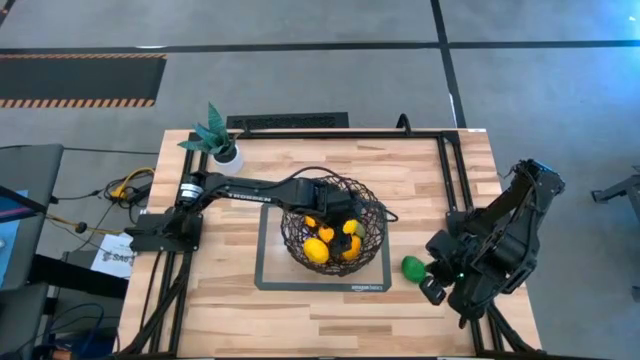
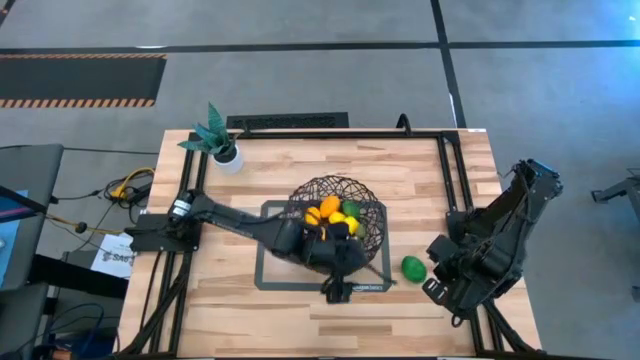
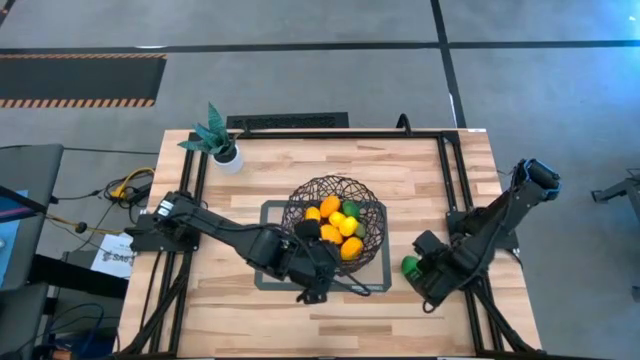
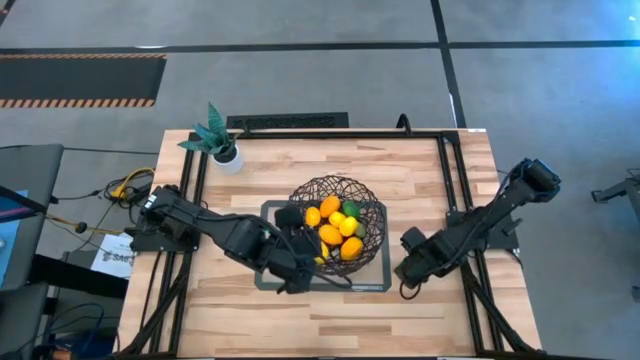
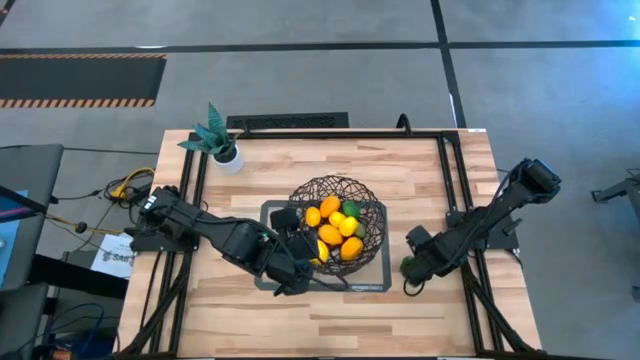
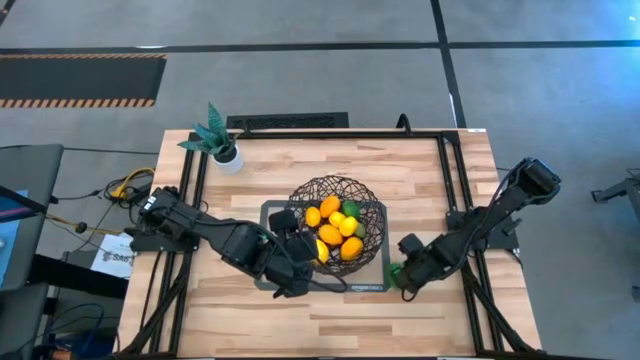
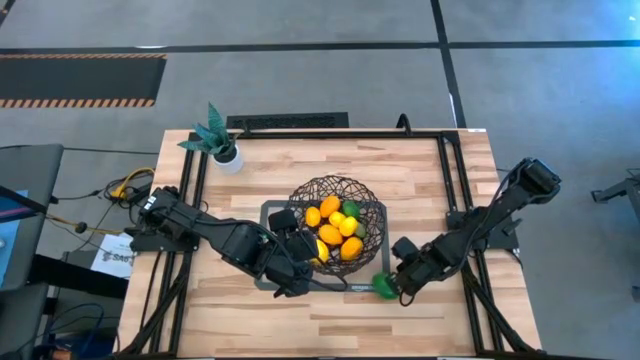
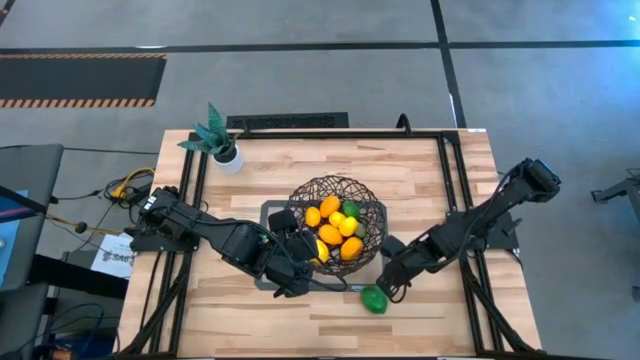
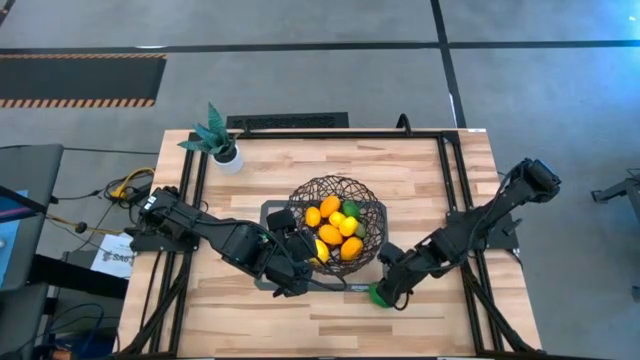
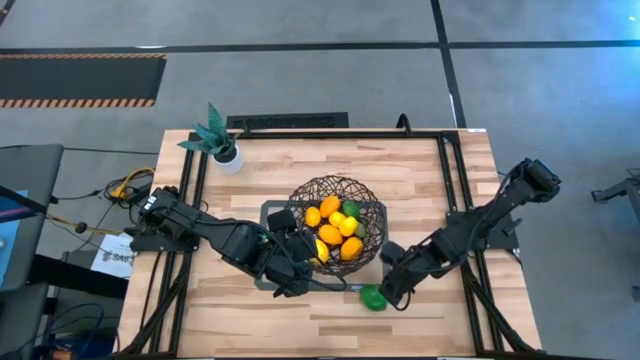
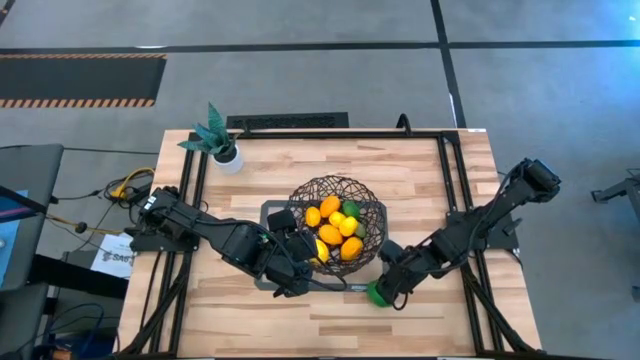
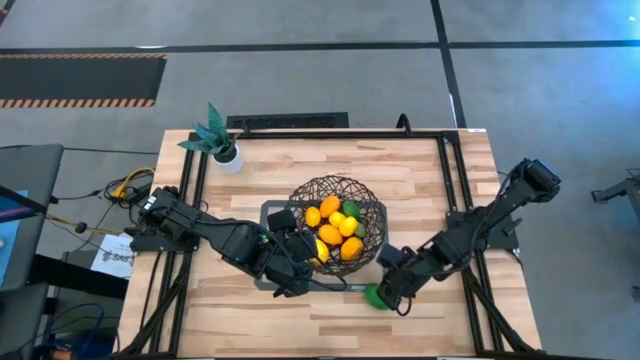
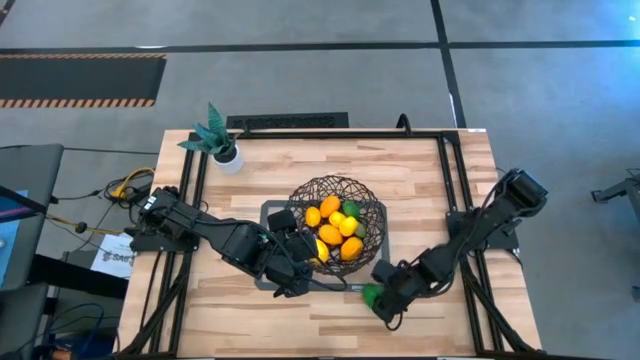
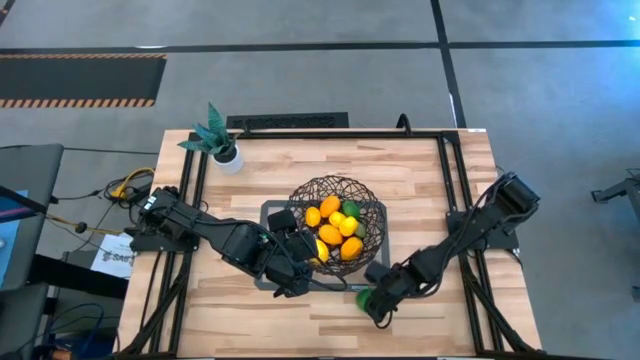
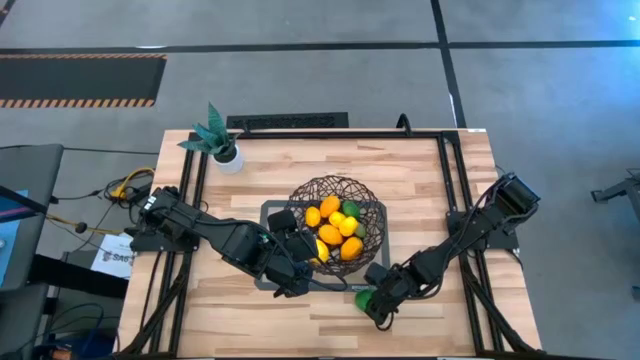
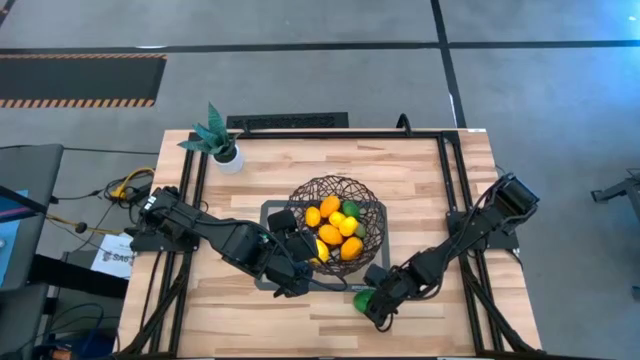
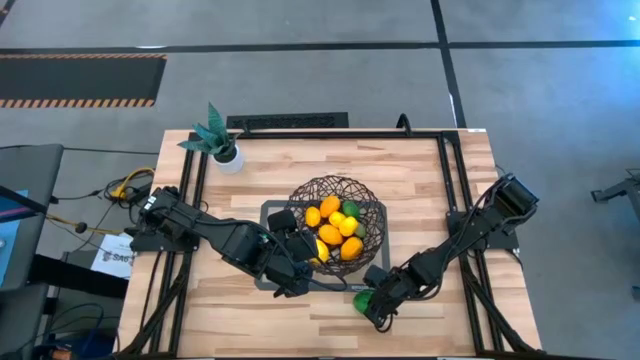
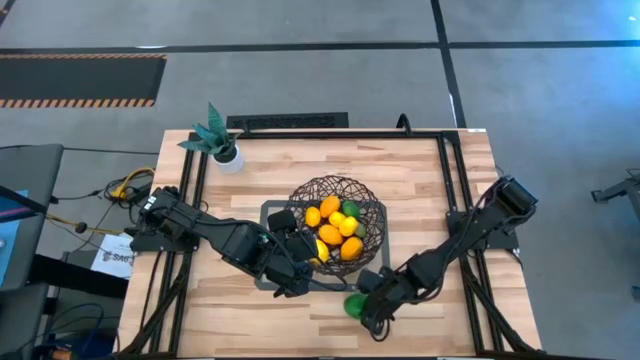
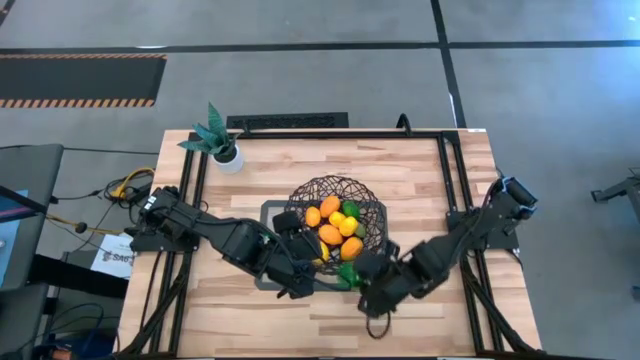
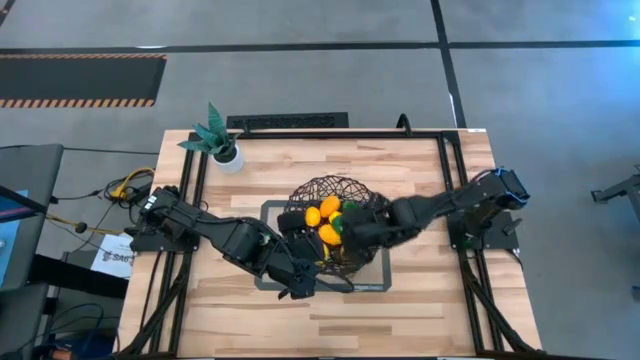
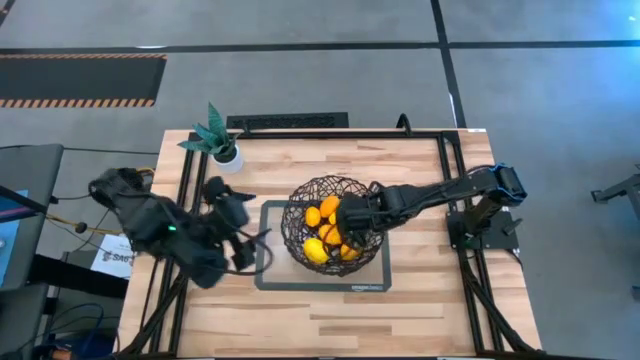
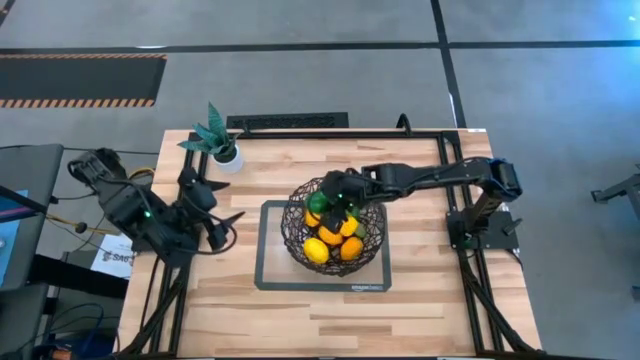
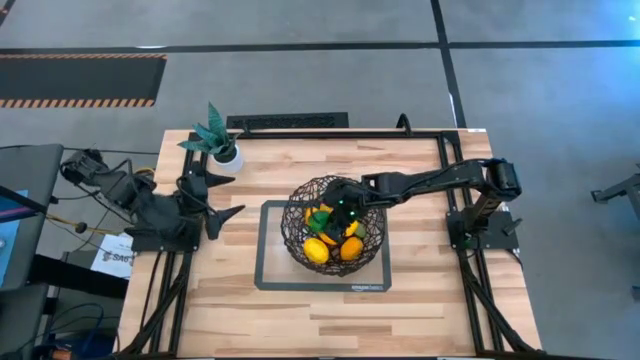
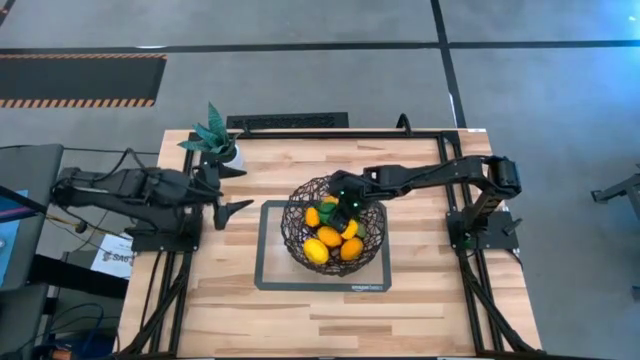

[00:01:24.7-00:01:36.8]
Task: Build produce basket
Put the lime into the basket

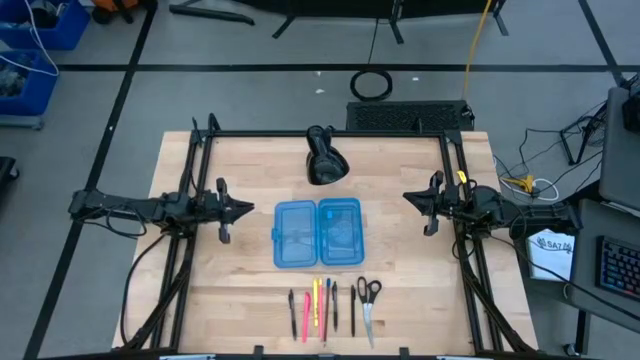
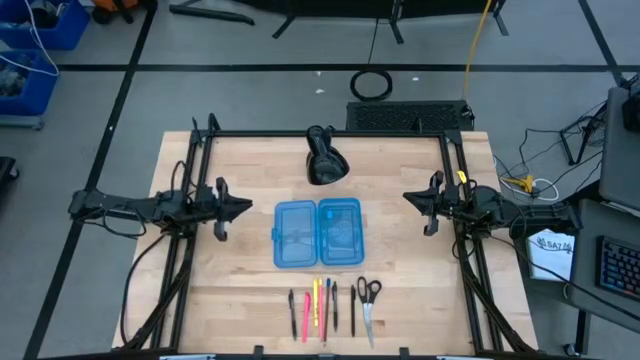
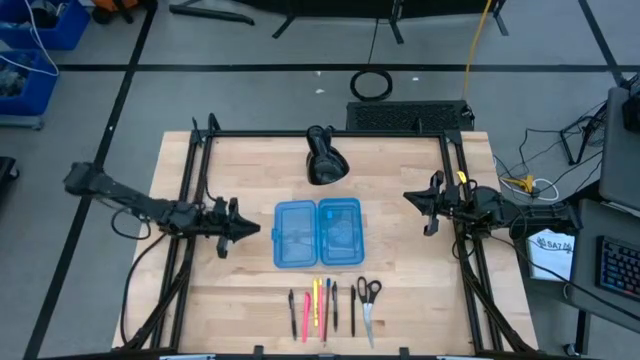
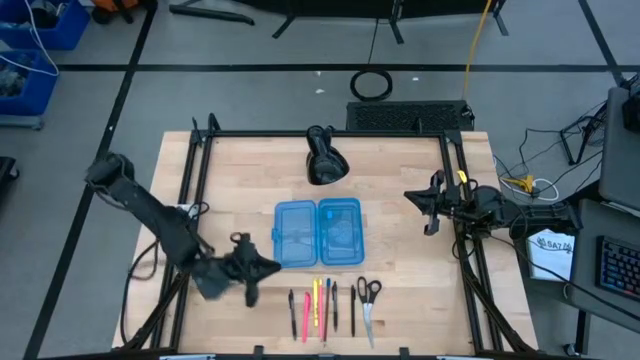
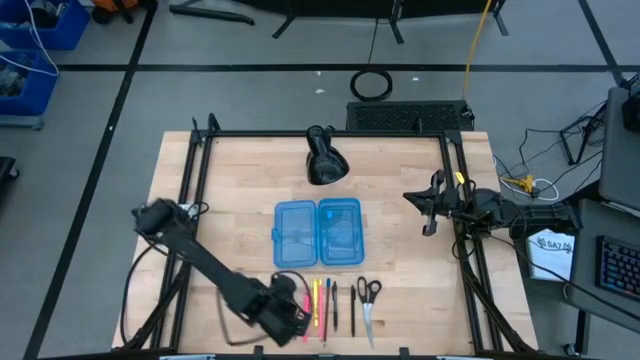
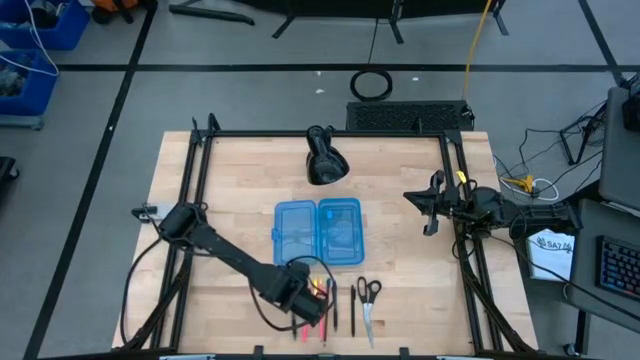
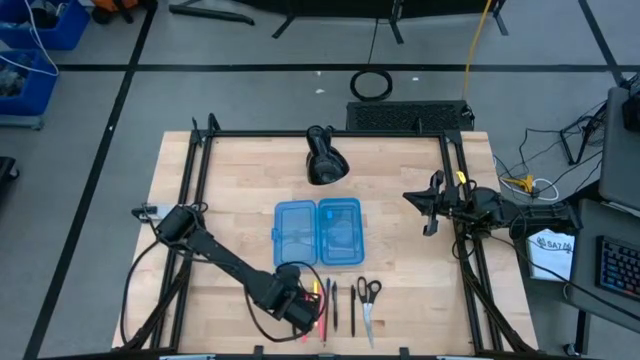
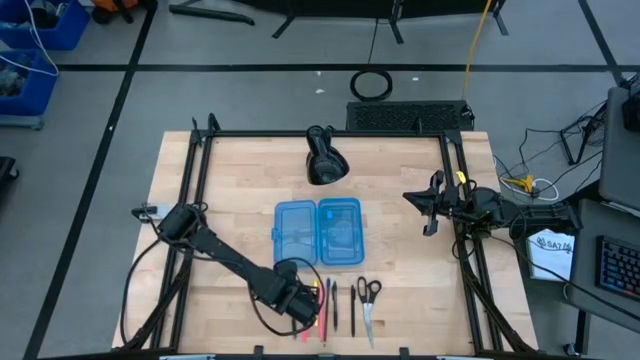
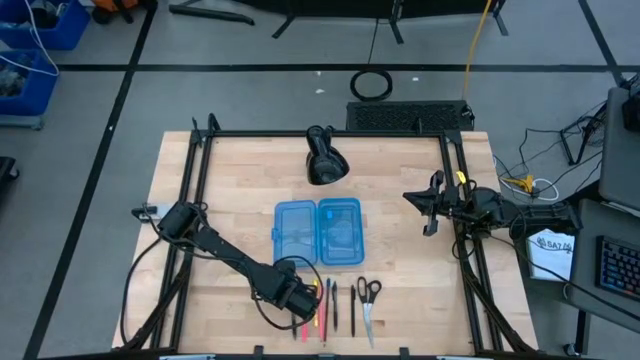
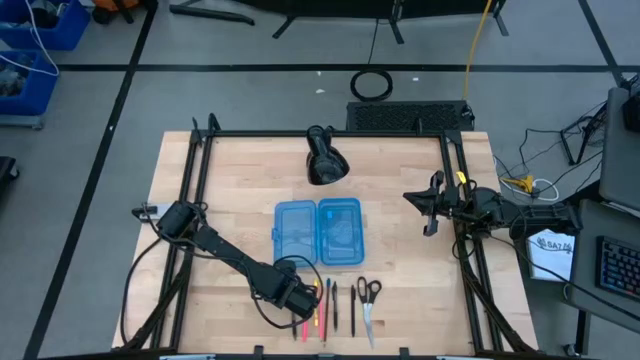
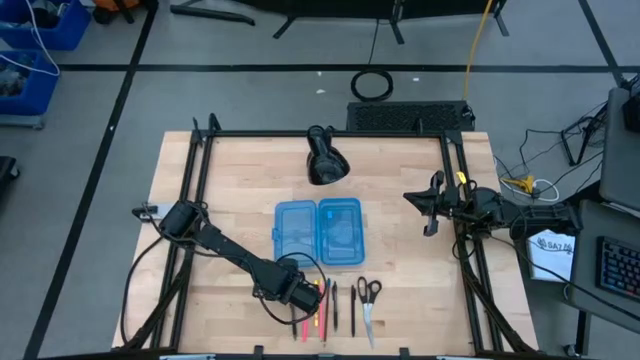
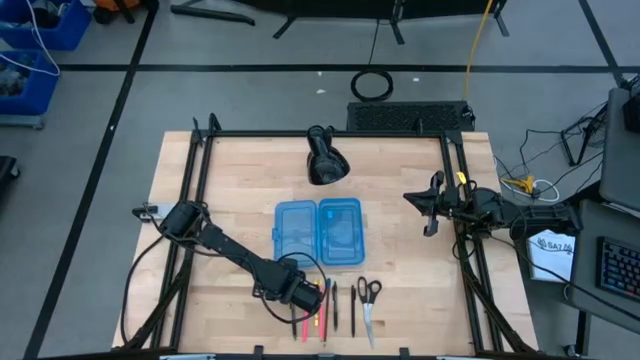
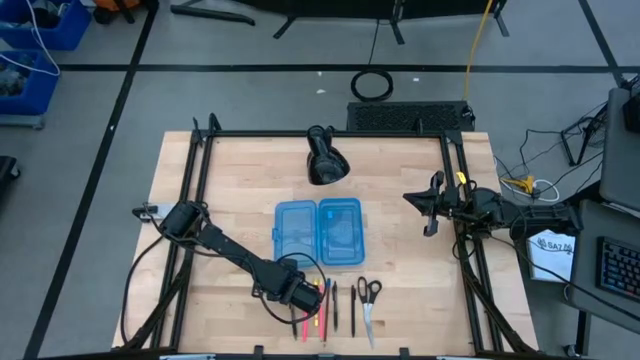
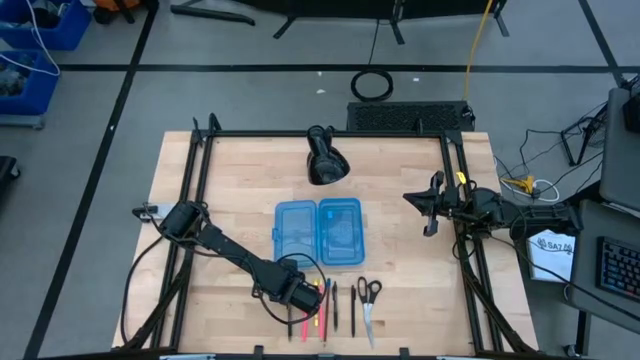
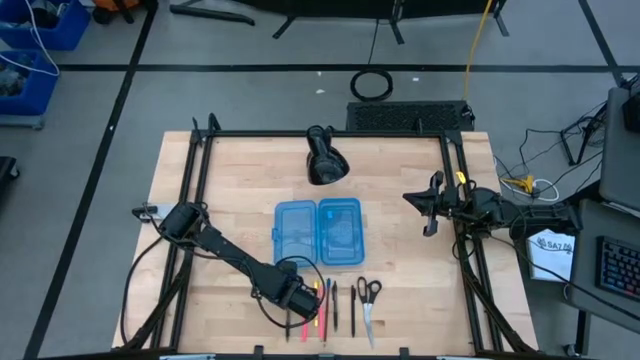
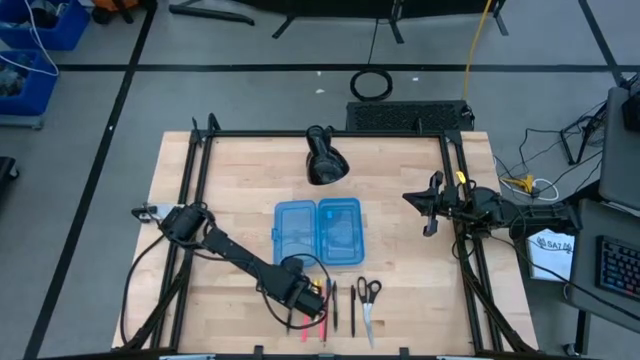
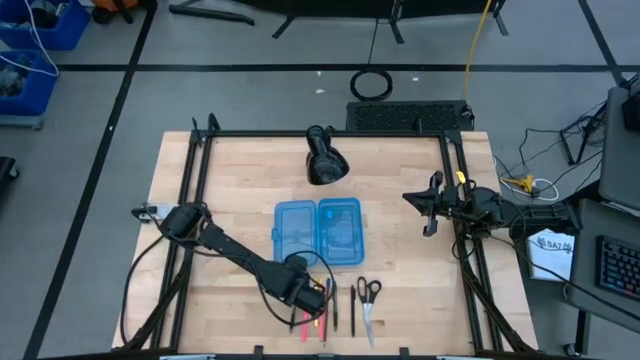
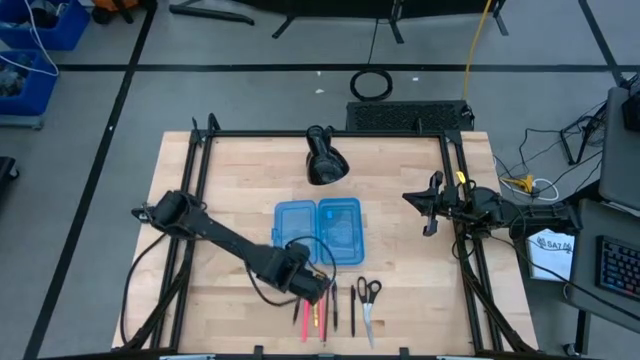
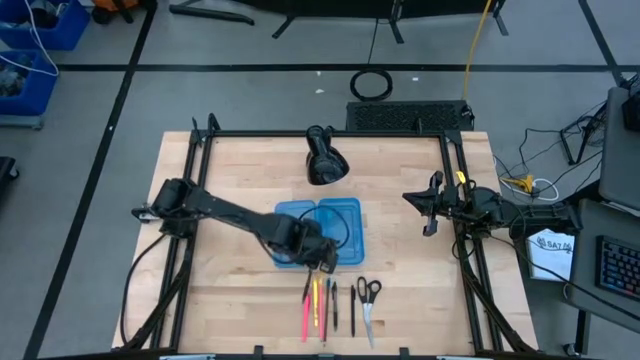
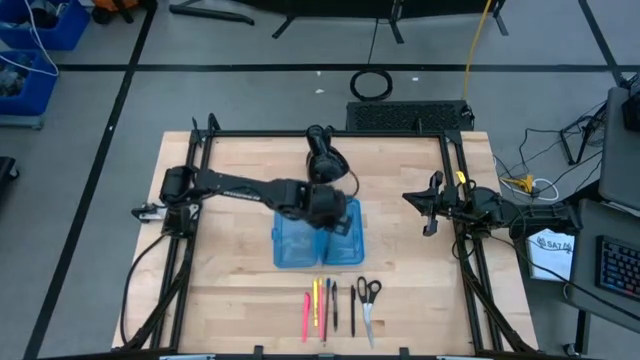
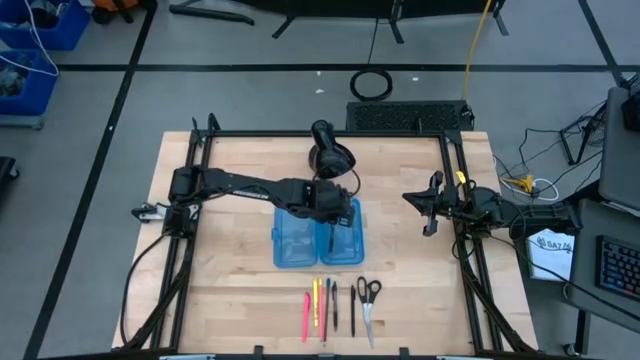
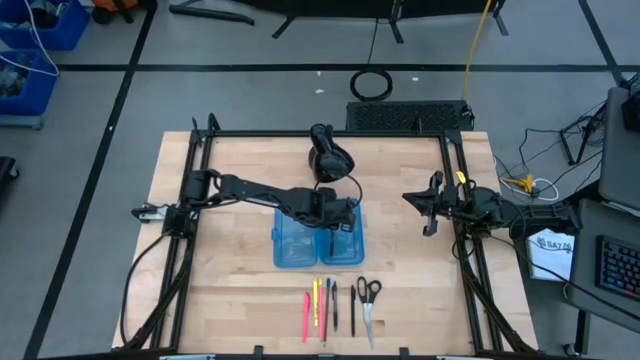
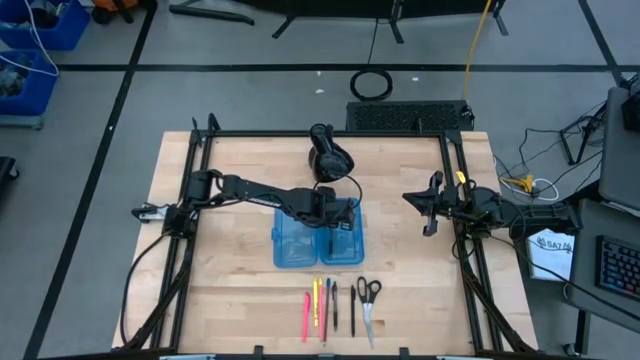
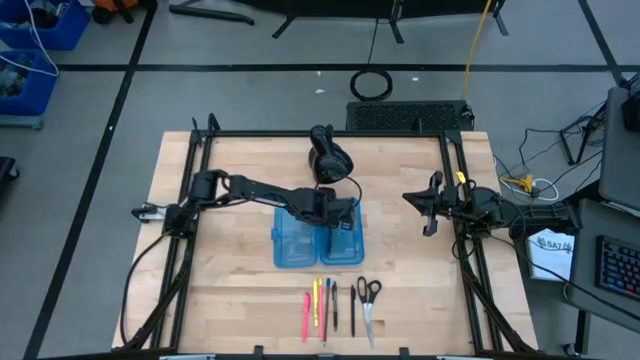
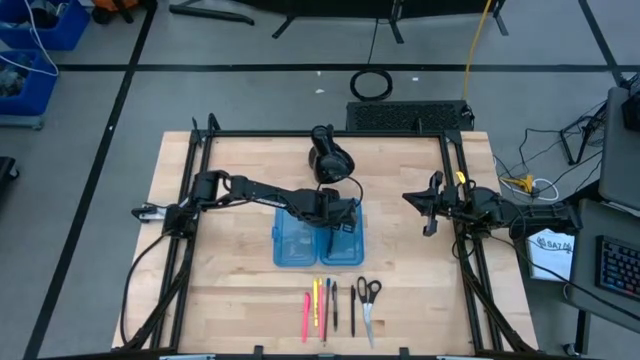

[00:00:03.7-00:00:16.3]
Task: Pick & place school supplies into a supply box
Put the left black pen into the blue supply box
